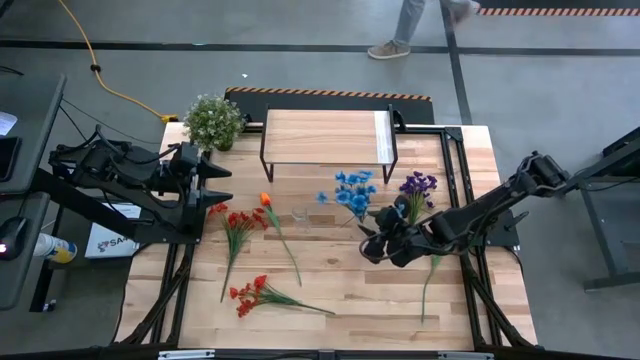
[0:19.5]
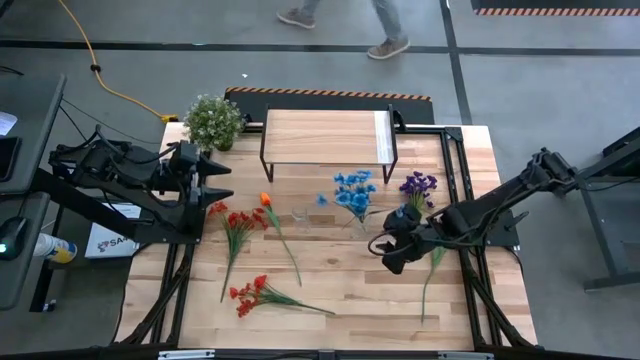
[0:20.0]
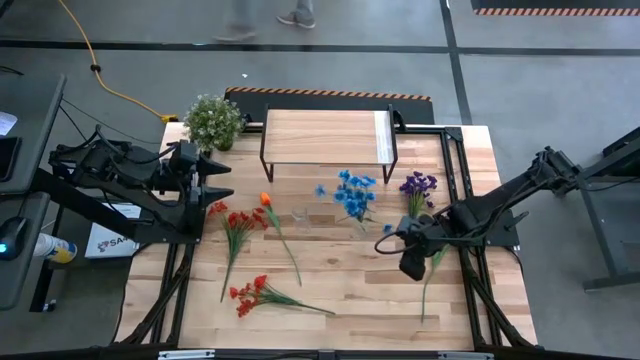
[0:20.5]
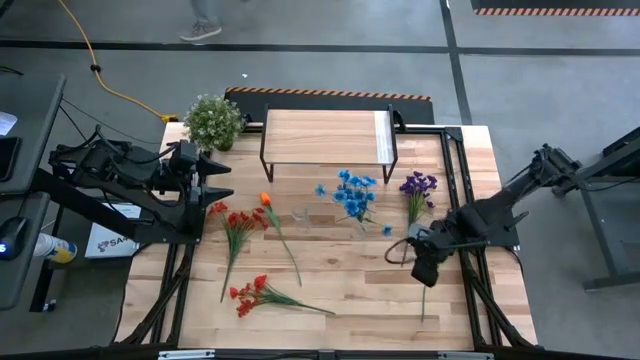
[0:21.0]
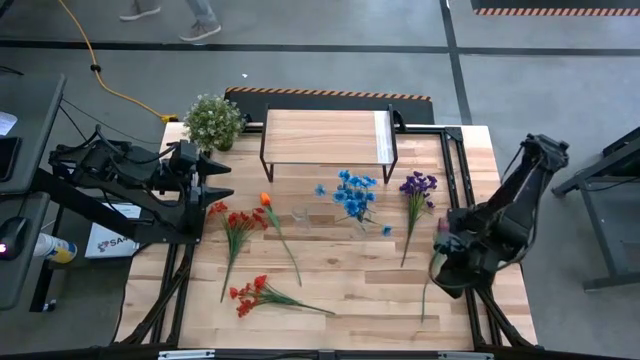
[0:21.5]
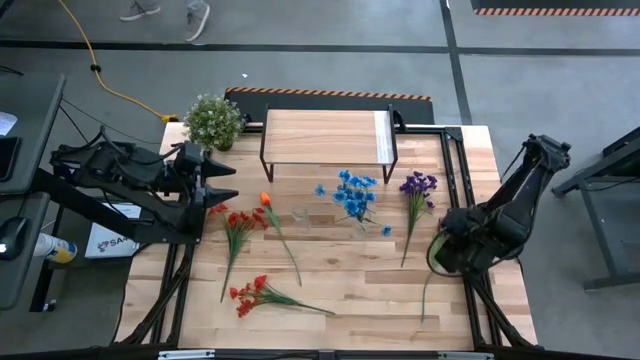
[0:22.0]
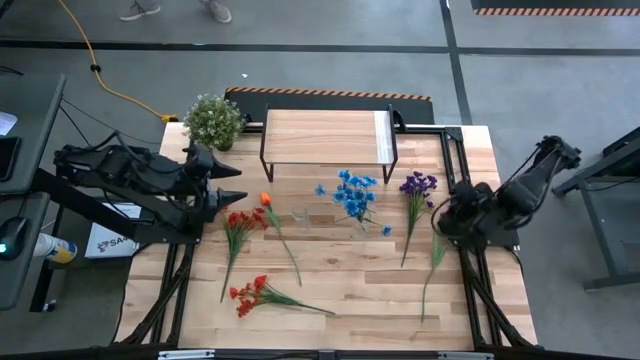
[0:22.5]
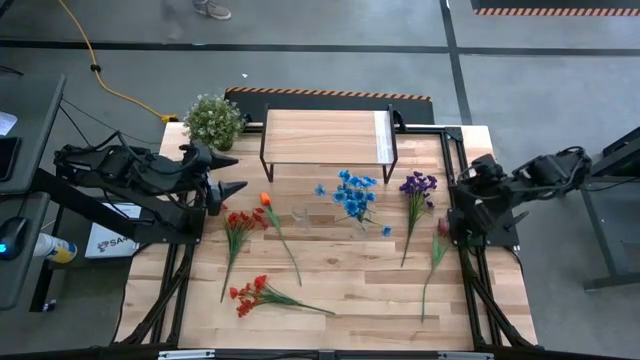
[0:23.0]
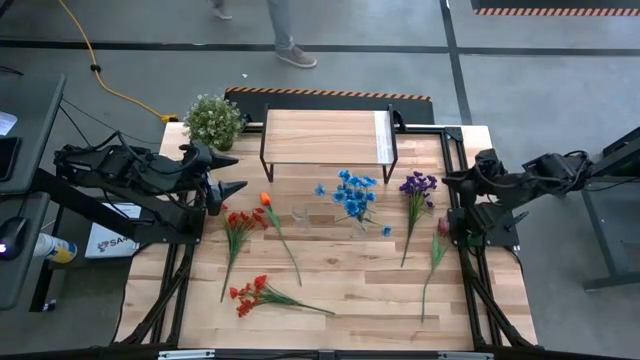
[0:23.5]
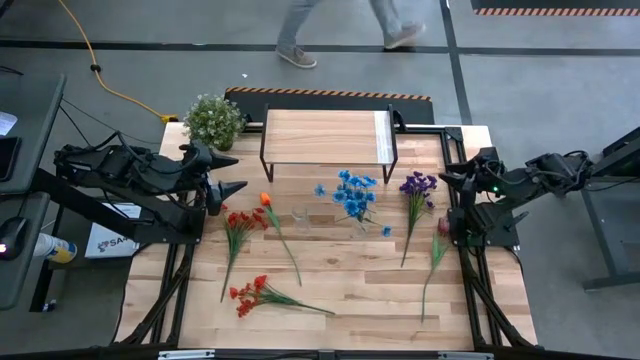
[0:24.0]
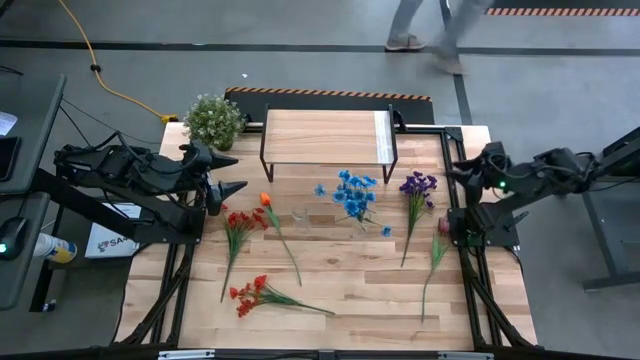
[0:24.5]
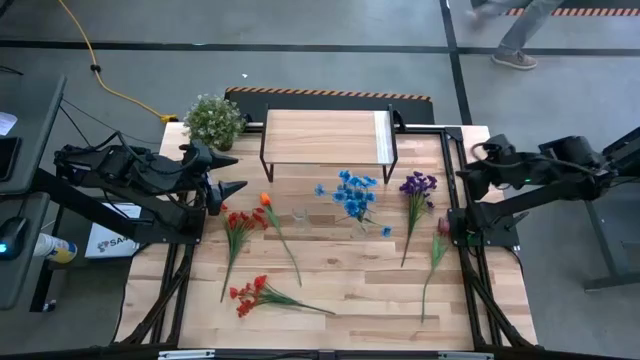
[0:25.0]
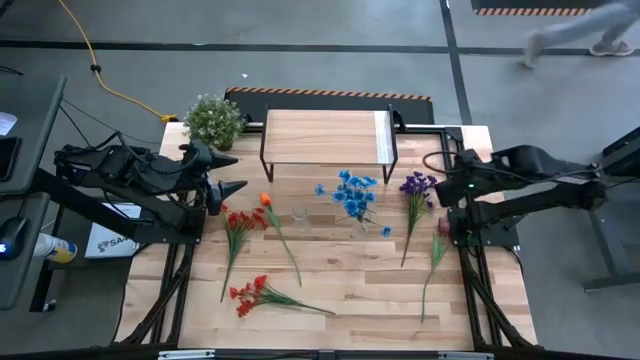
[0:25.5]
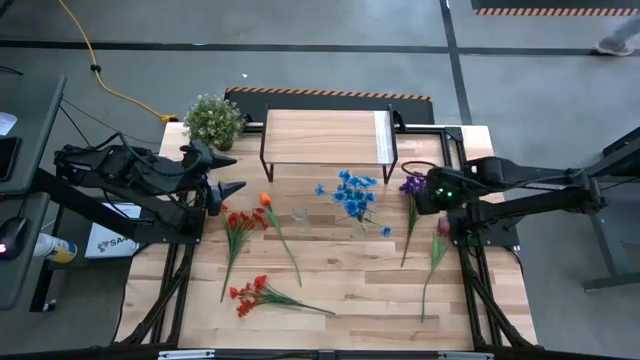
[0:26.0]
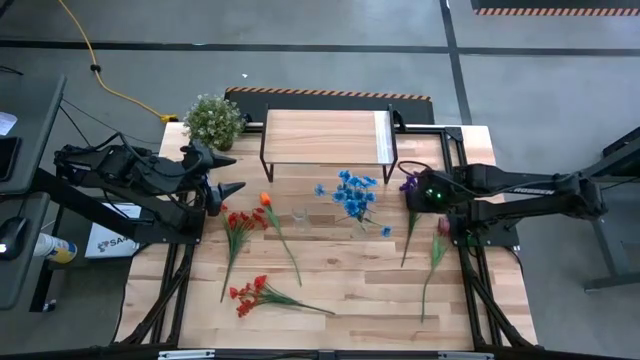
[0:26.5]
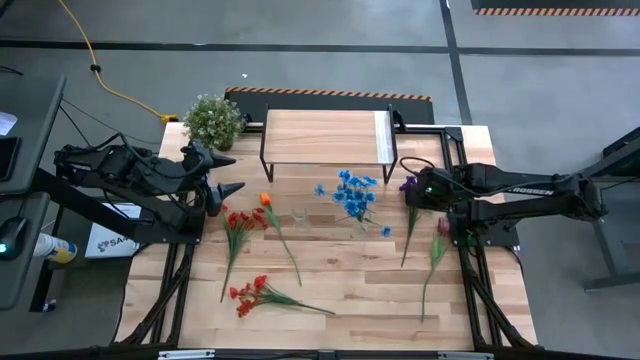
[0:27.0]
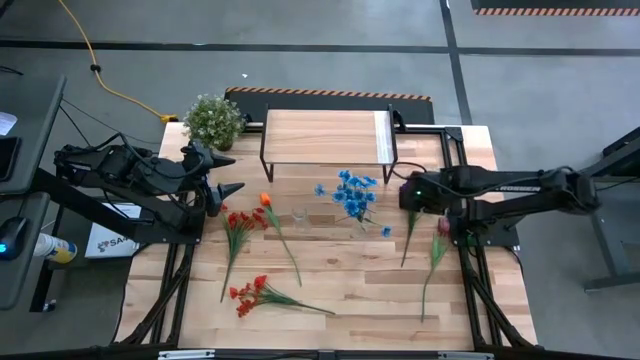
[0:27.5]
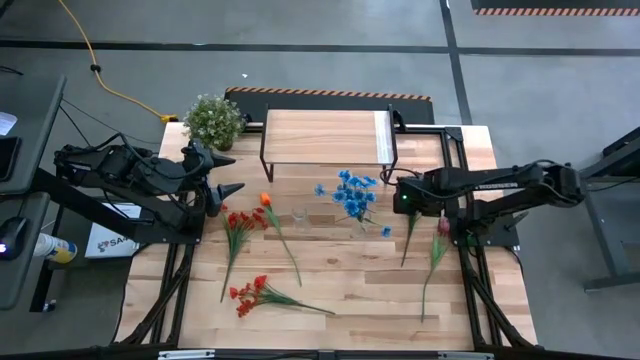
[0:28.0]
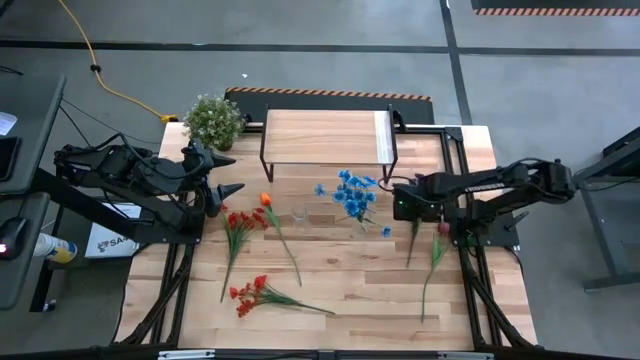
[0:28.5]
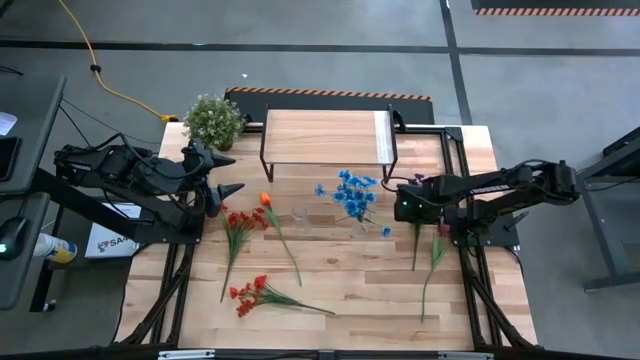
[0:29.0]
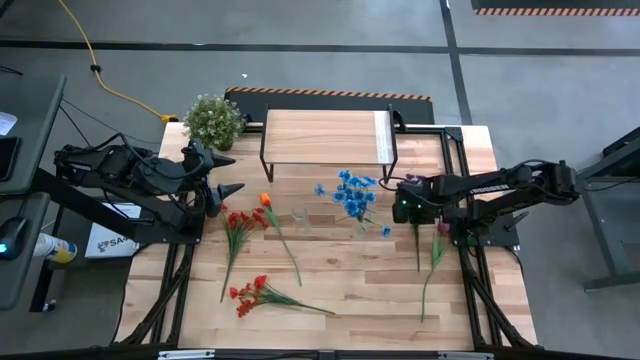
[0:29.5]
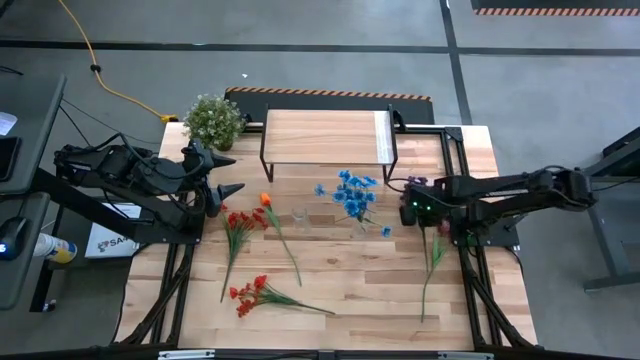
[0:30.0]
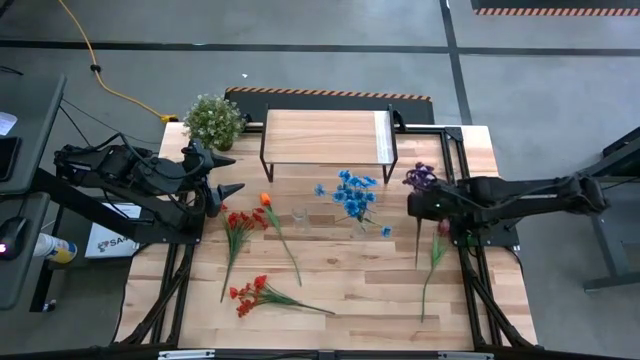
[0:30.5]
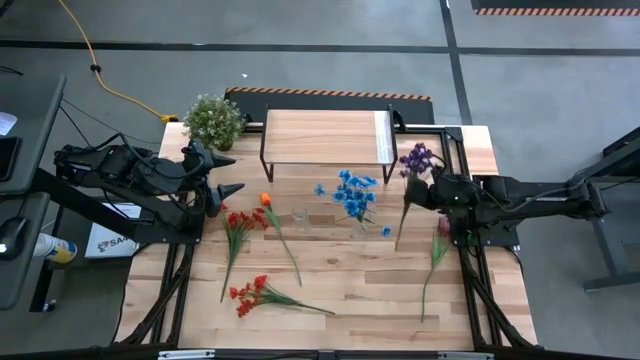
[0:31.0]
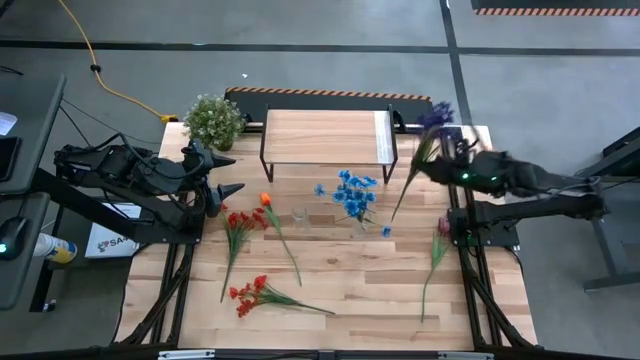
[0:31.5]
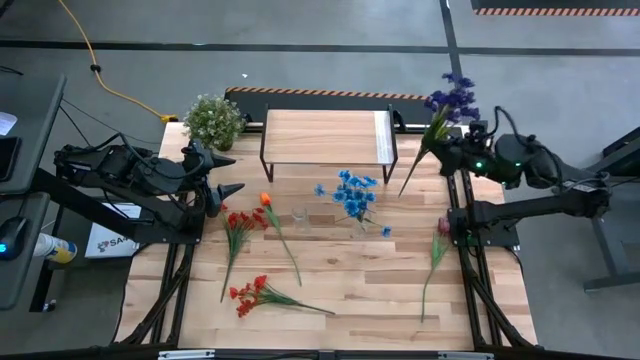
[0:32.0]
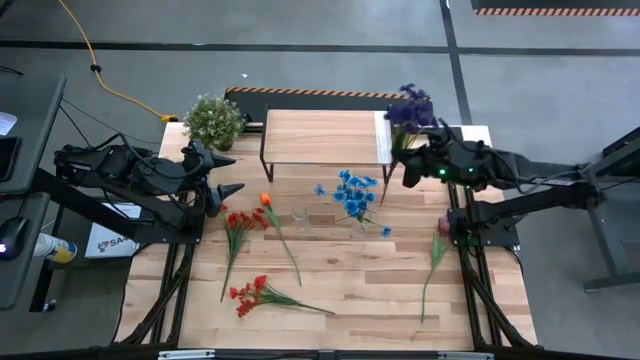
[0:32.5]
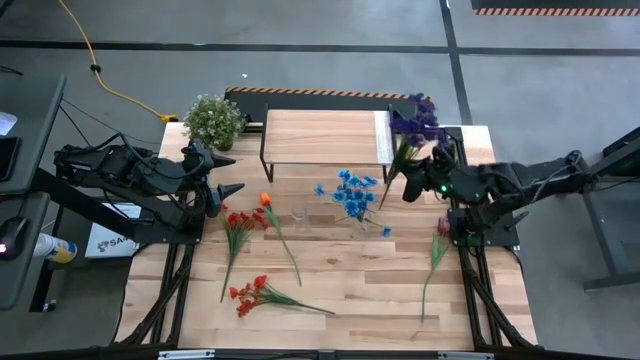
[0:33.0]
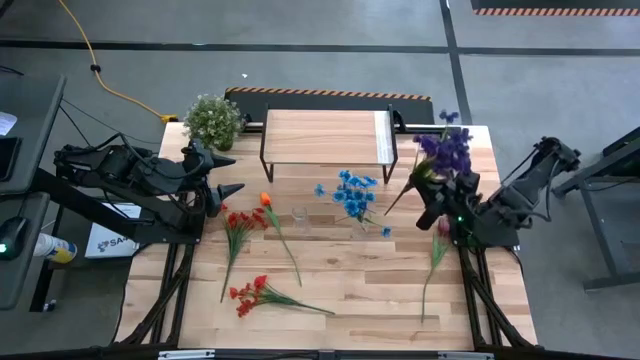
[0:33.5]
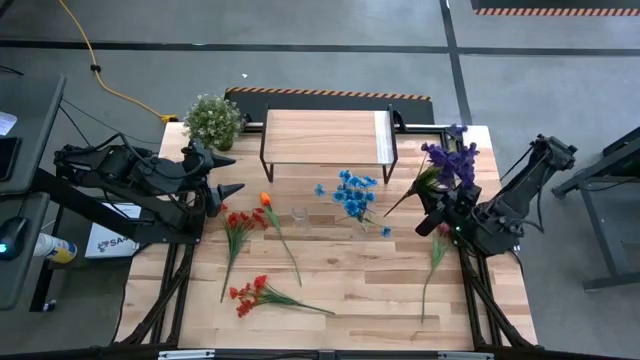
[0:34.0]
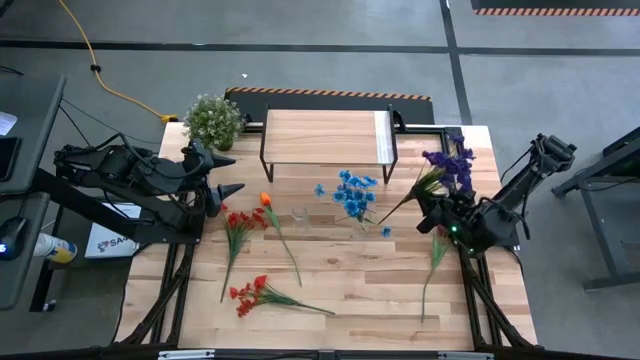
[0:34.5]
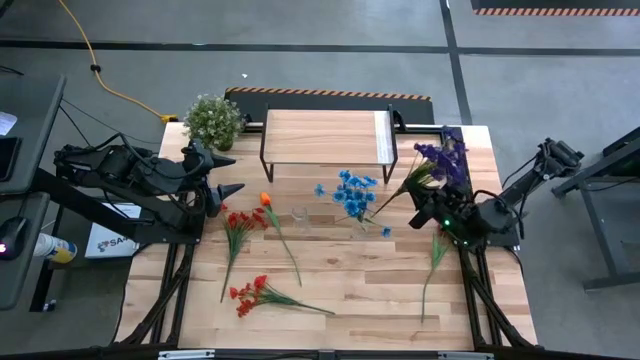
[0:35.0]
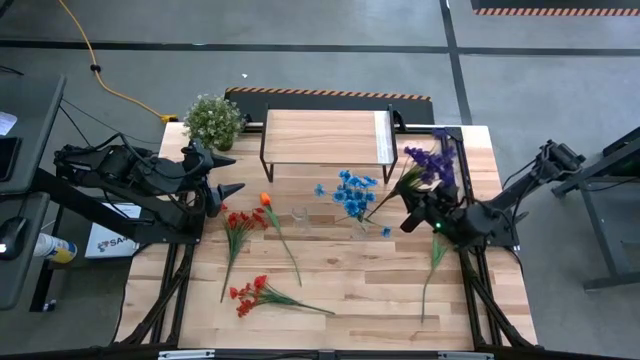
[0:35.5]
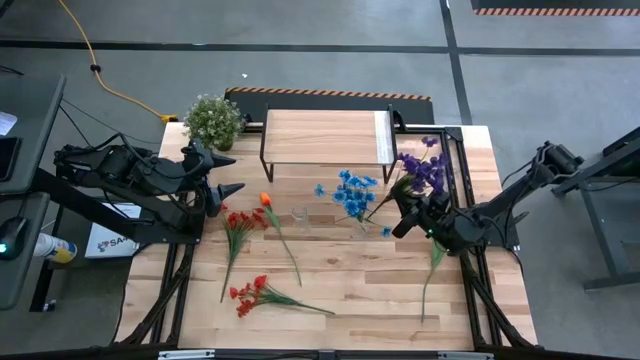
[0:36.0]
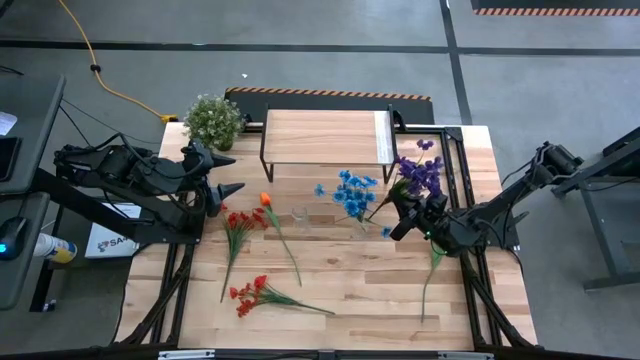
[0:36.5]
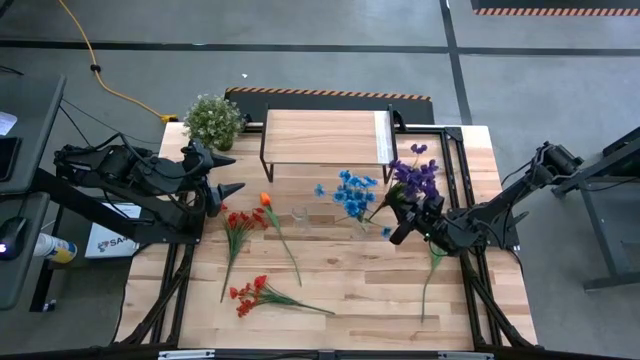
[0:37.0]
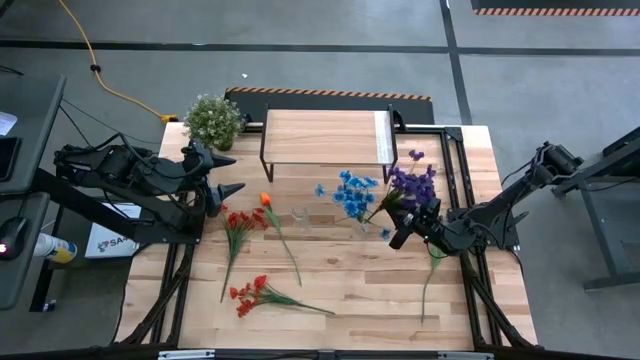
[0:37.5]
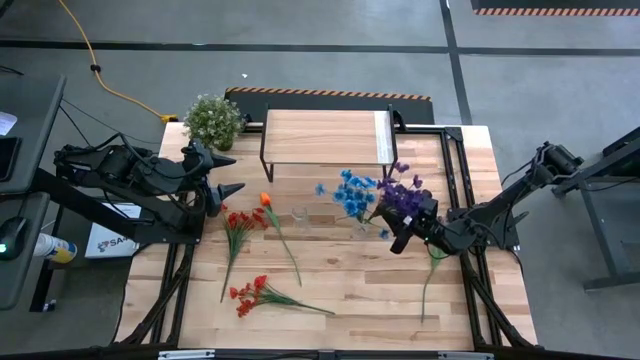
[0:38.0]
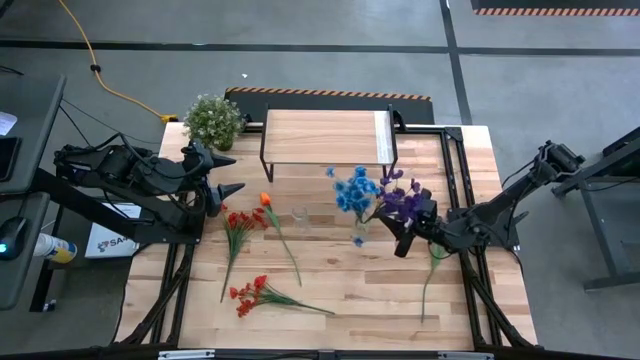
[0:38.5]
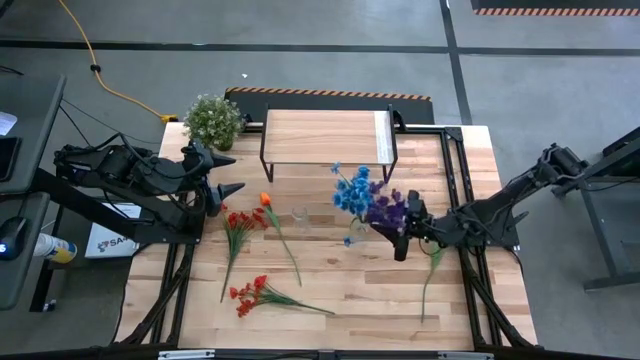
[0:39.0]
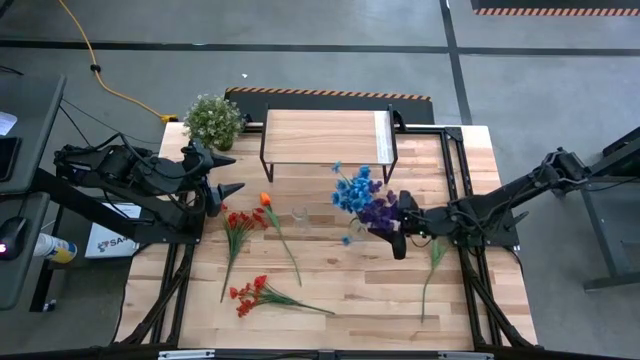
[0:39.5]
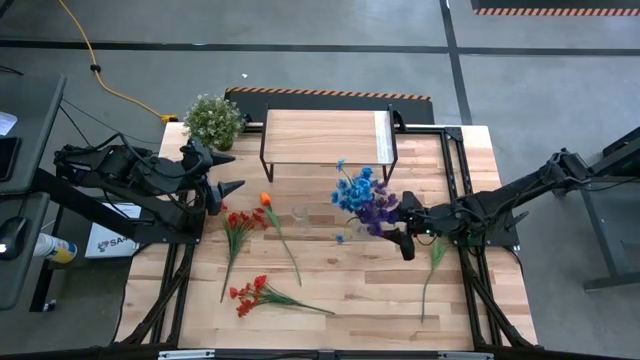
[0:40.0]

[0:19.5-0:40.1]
Task: Pick and place flowers into a vace then onto a shelf
Put the violet flowers into the right transparent vase
